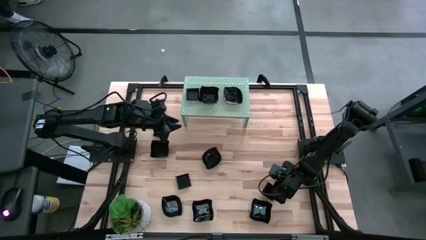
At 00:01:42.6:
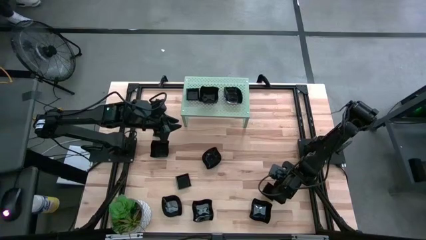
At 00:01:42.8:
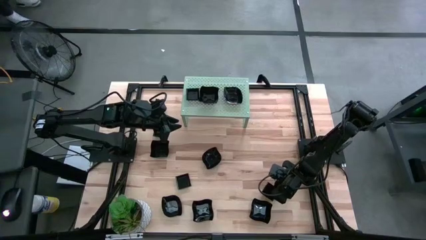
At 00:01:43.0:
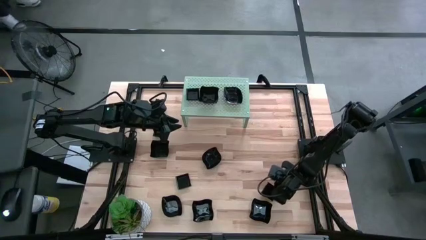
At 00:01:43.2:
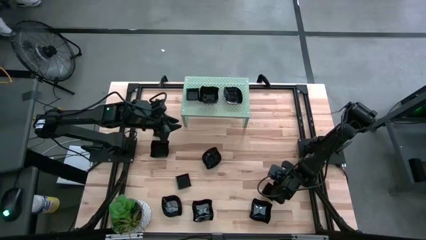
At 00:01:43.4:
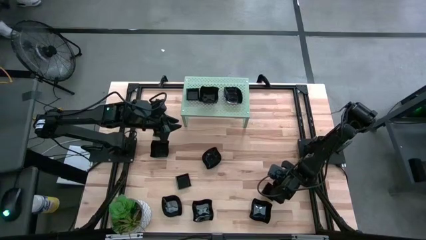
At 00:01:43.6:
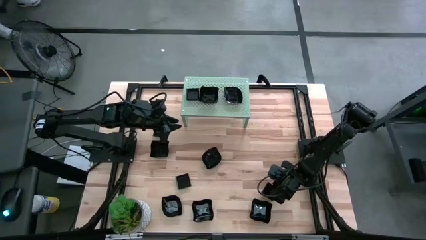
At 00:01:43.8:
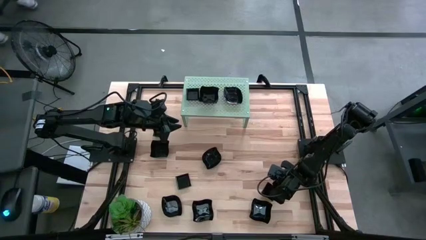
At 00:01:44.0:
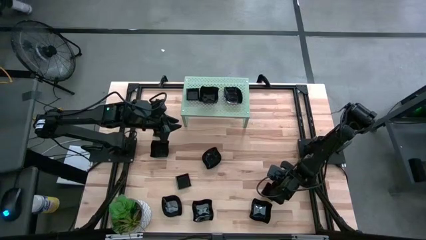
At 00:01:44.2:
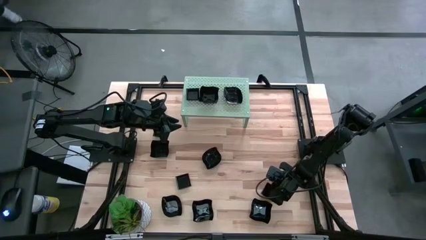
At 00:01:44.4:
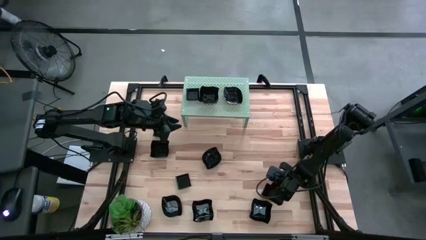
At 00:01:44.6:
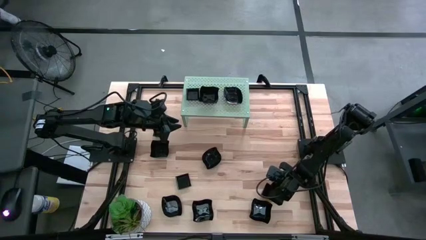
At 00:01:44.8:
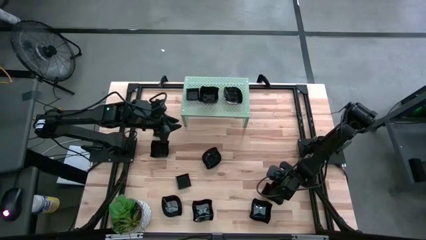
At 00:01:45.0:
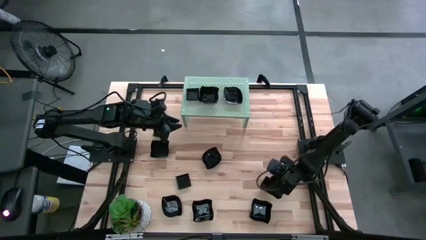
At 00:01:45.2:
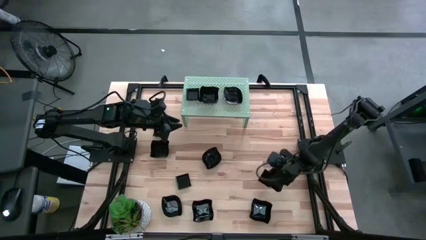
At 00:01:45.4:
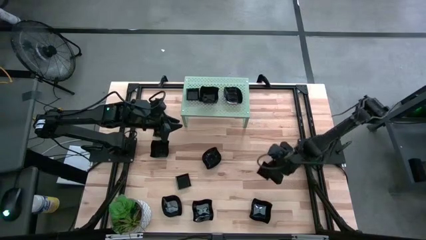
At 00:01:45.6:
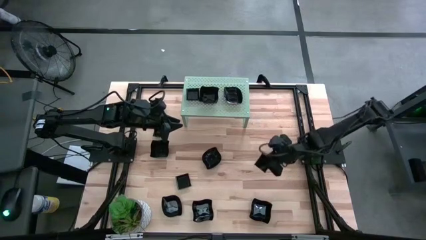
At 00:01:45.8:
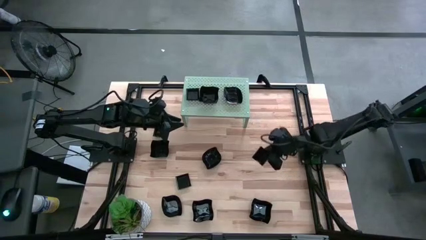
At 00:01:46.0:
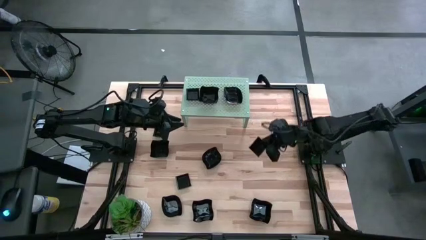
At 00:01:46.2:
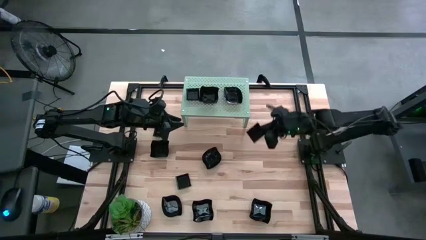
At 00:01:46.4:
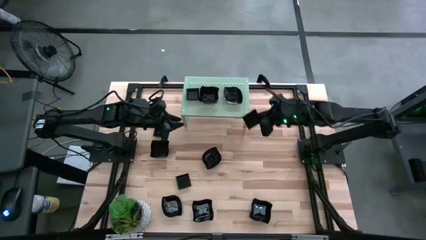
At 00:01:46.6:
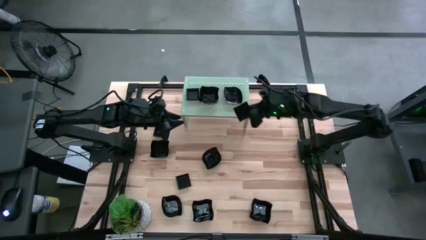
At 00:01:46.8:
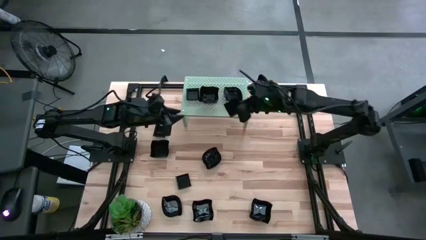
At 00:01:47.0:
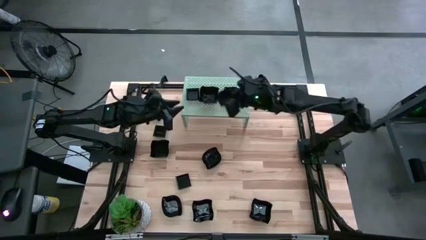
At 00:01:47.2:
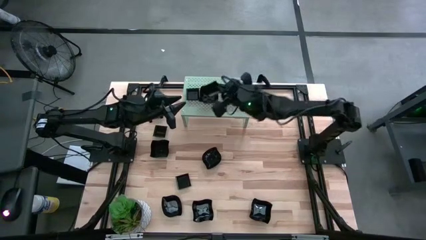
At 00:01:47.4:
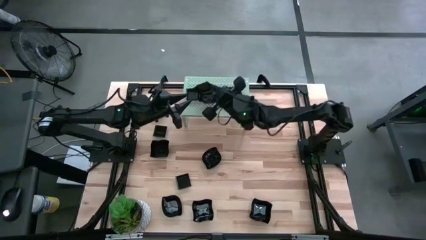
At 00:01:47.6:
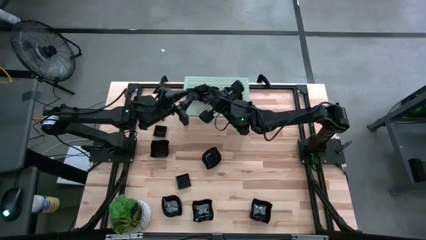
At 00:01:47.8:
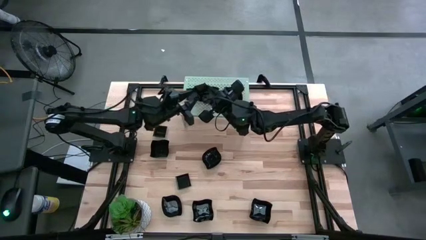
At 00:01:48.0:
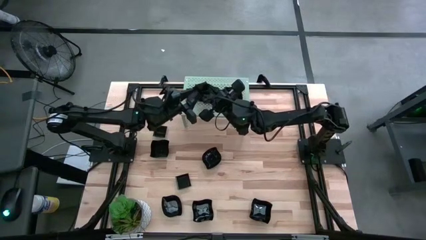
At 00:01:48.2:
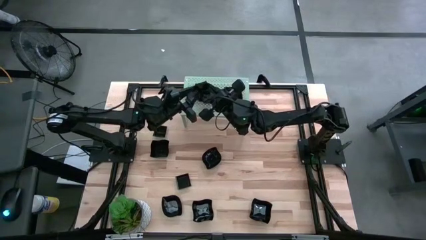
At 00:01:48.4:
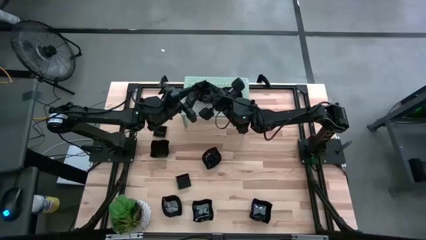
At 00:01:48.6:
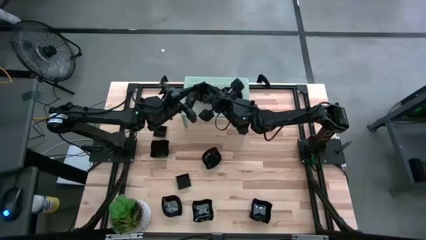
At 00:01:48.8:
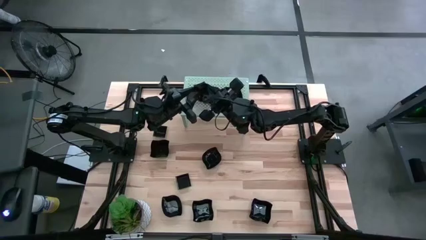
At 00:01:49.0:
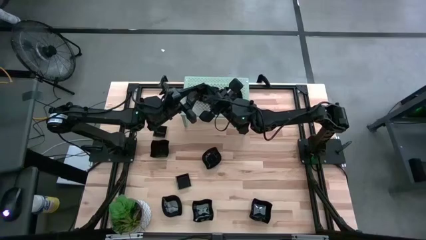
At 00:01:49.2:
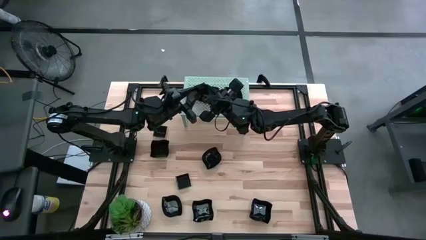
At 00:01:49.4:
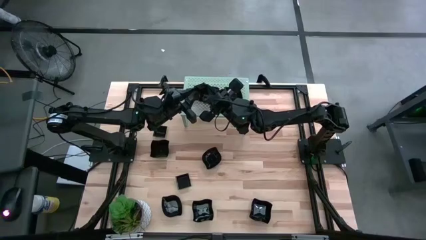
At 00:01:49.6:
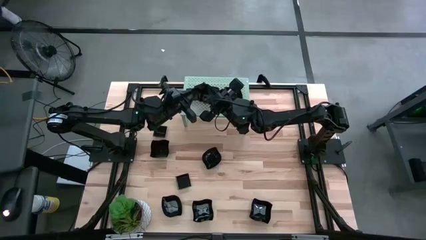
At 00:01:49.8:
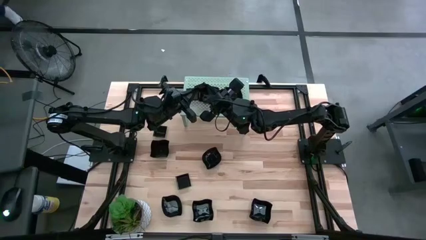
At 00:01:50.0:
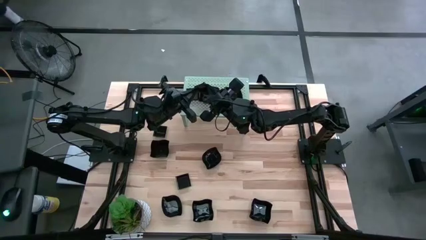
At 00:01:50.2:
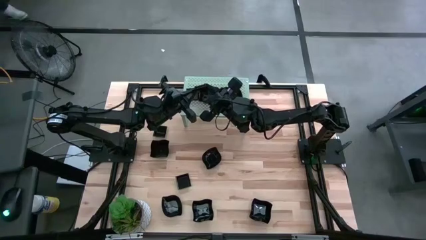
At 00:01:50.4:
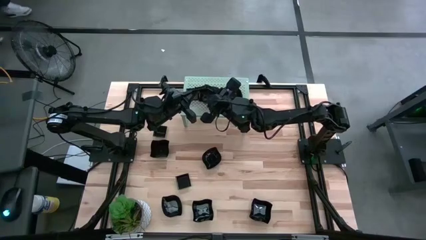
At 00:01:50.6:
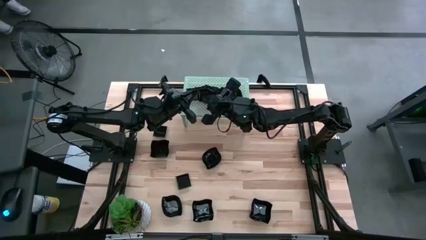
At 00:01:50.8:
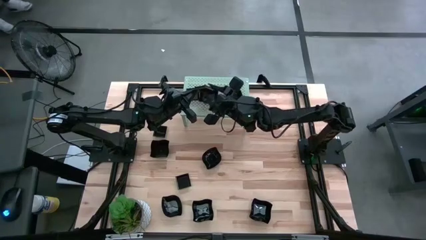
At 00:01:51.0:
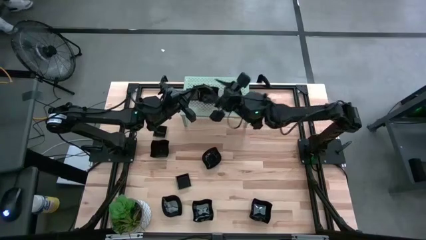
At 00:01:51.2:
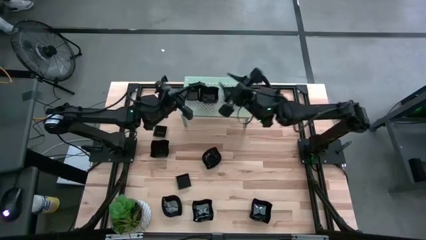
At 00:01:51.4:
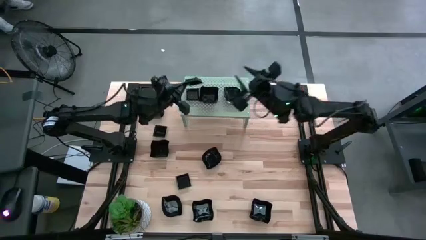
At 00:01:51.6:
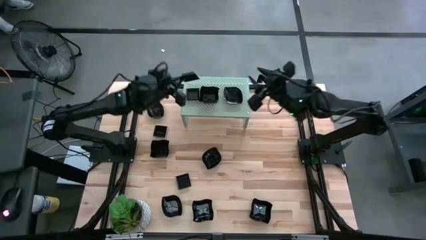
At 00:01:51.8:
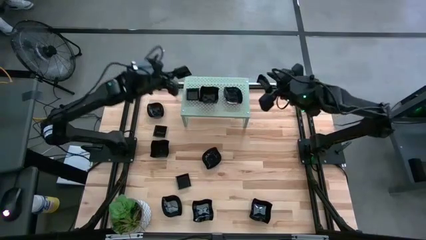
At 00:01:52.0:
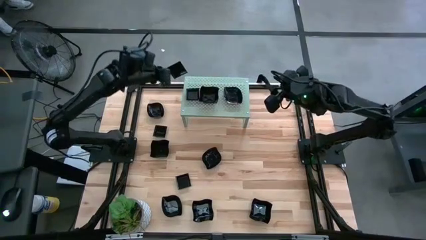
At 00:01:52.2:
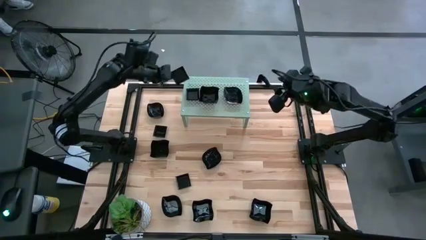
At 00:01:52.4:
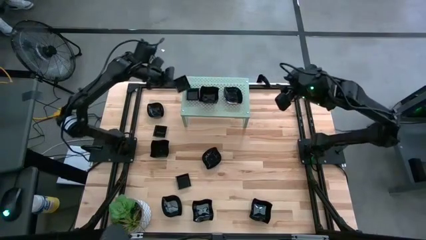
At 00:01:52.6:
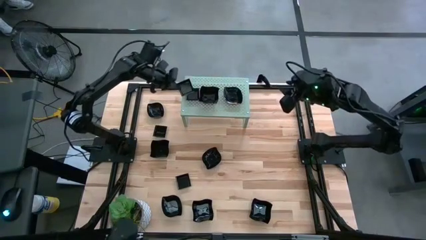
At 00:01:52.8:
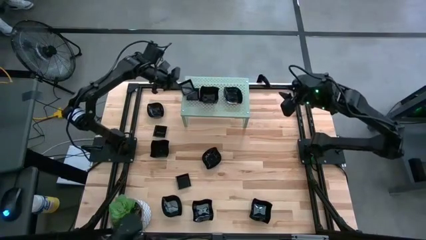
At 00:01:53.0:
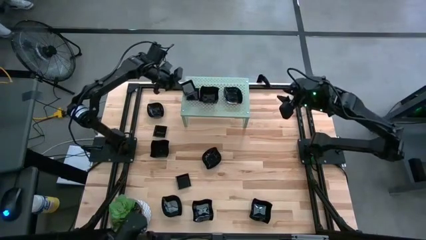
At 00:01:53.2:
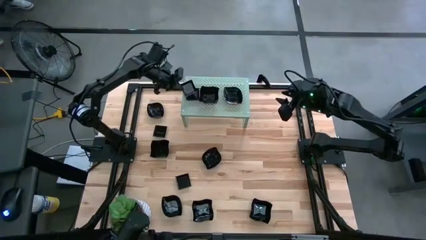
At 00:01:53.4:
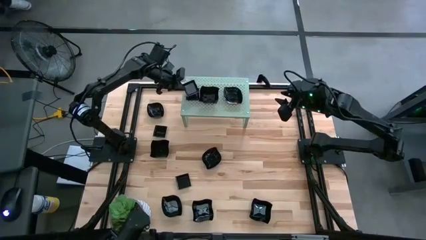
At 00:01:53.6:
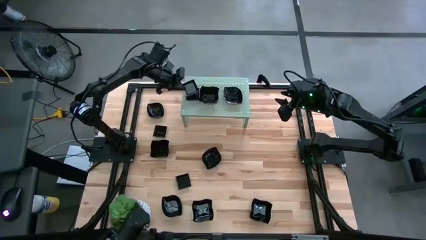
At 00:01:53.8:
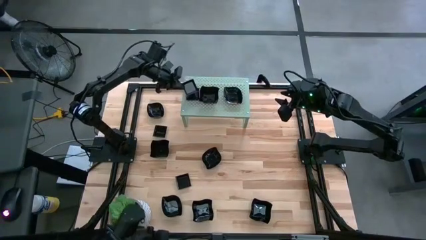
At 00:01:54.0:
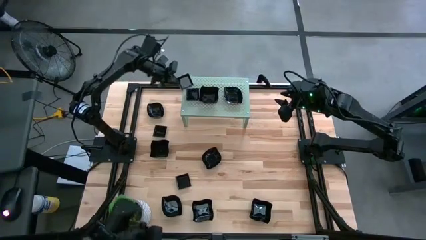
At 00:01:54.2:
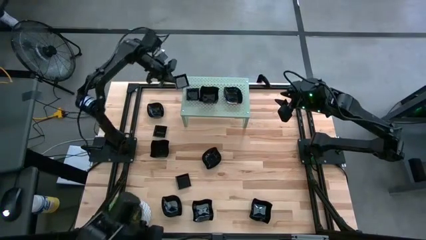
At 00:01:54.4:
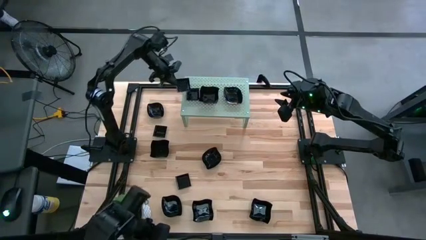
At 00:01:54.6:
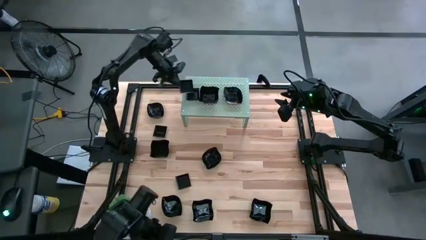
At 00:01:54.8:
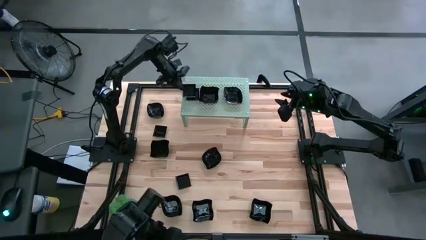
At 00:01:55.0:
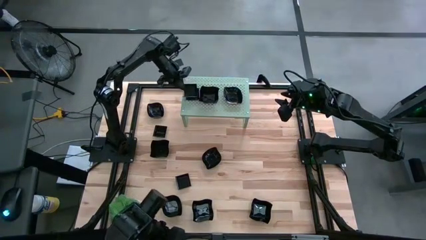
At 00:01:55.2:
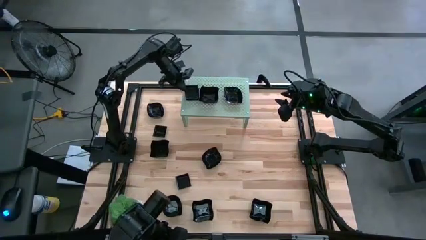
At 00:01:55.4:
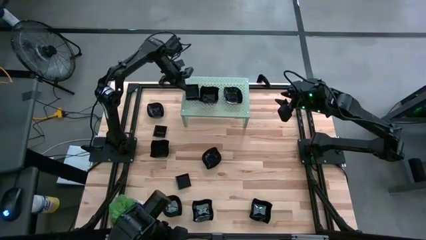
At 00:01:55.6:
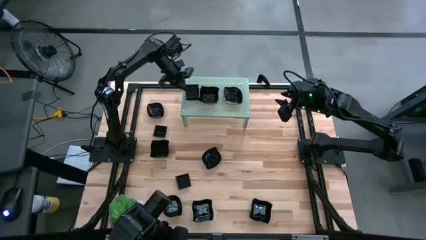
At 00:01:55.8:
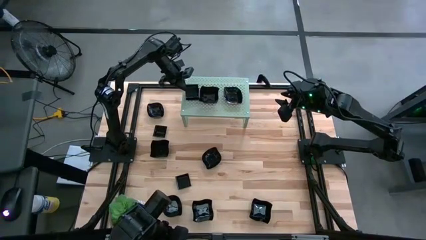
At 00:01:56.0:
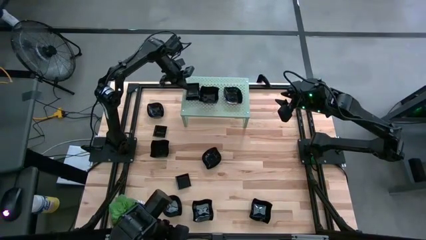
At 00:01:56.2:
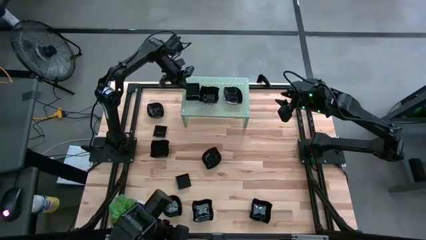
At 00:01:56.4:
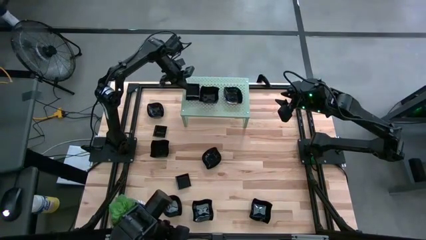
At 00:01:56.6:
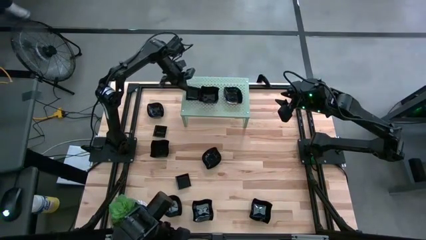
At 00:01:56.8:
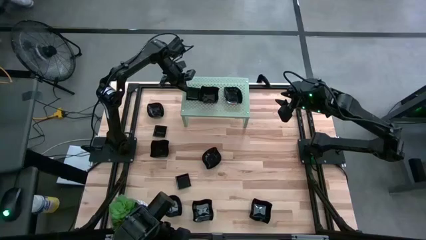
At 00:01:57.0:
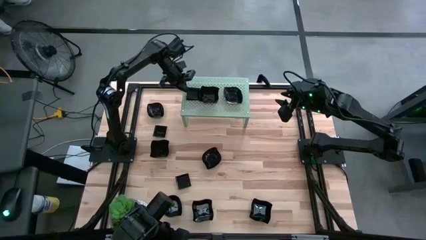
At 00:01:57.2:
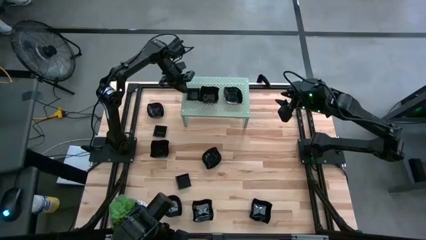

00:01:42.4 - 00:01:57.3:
Task: Pick & Place Mini shaped plates
Stack the square shaped plate on top of the square shaped plate on the shelf
